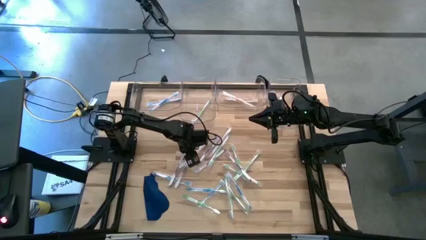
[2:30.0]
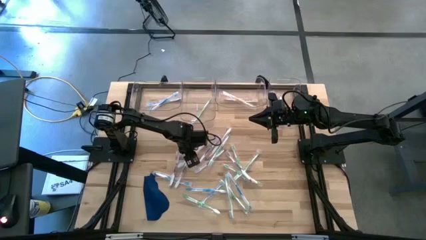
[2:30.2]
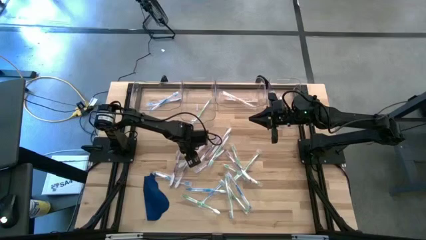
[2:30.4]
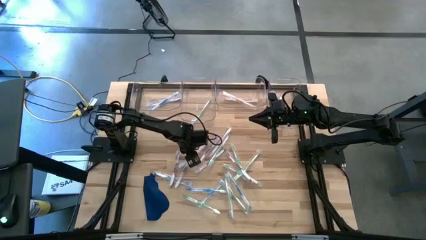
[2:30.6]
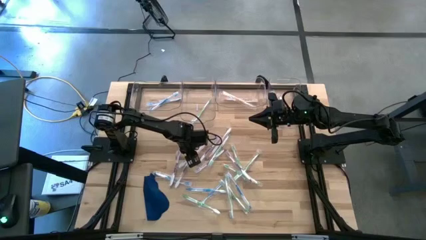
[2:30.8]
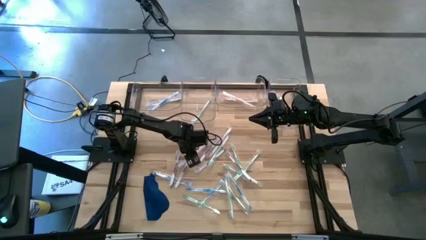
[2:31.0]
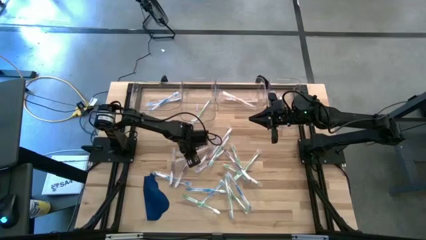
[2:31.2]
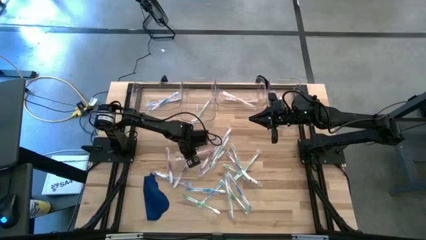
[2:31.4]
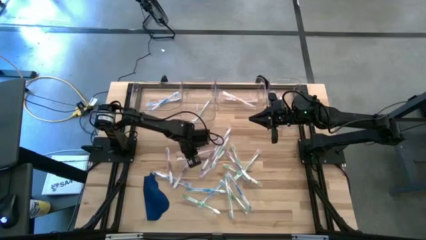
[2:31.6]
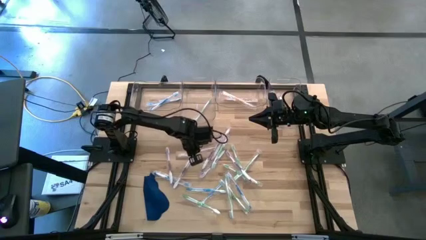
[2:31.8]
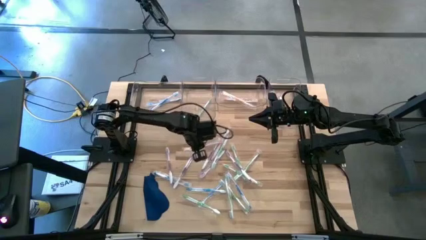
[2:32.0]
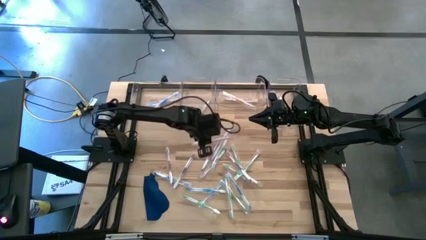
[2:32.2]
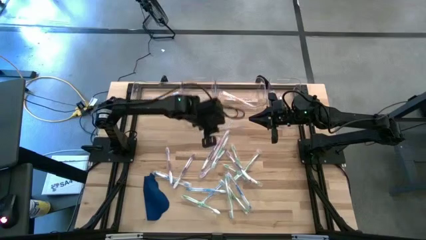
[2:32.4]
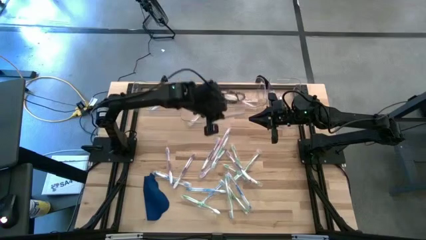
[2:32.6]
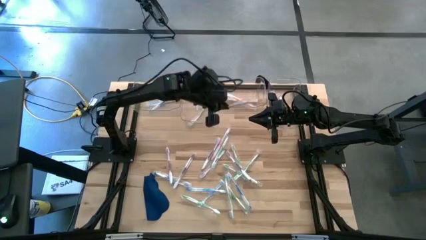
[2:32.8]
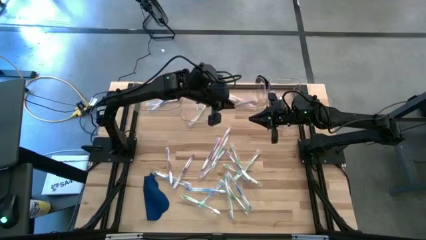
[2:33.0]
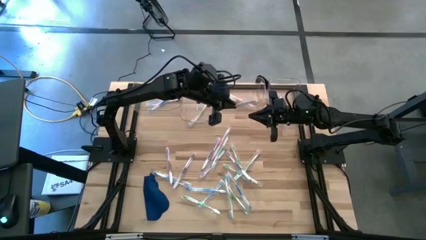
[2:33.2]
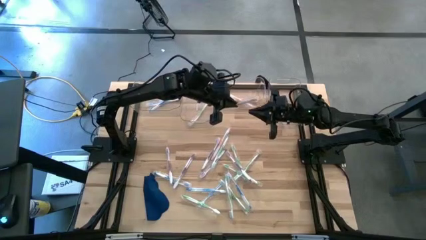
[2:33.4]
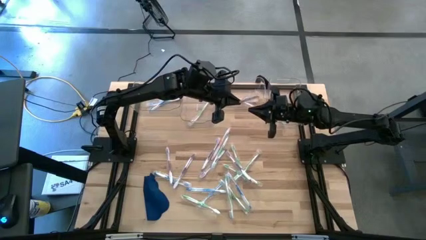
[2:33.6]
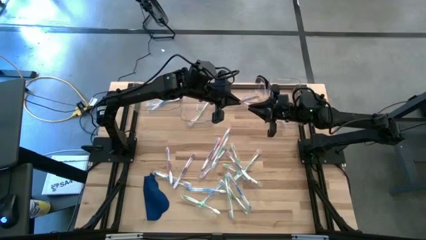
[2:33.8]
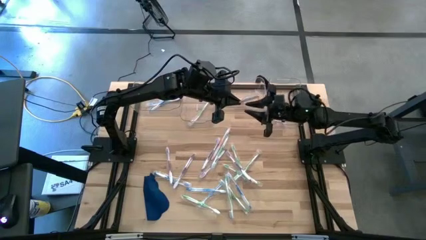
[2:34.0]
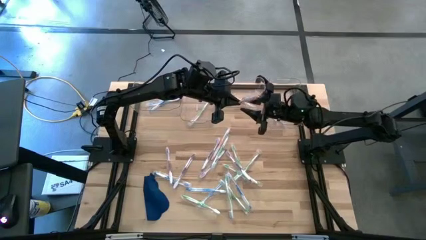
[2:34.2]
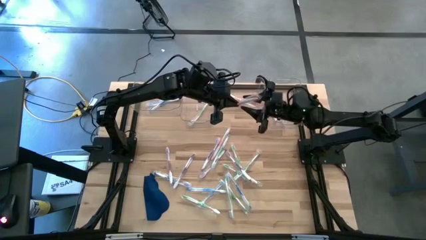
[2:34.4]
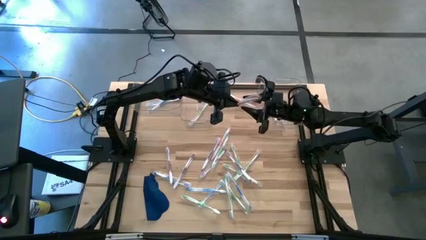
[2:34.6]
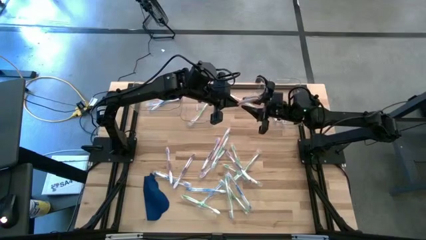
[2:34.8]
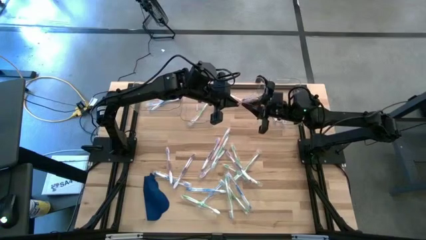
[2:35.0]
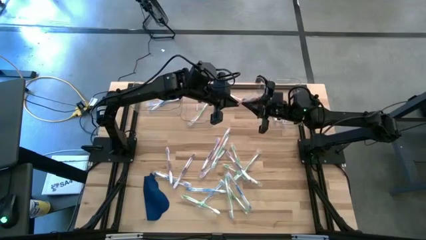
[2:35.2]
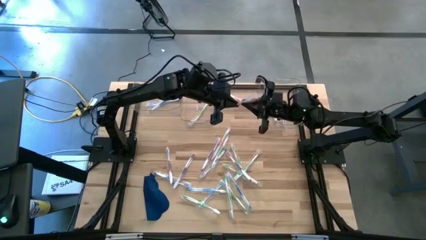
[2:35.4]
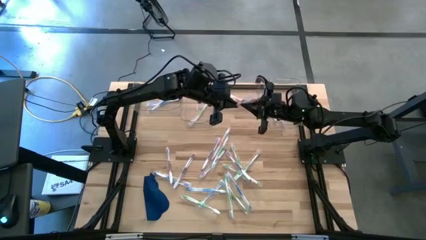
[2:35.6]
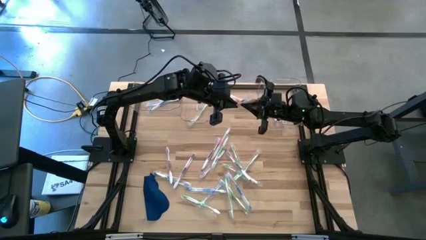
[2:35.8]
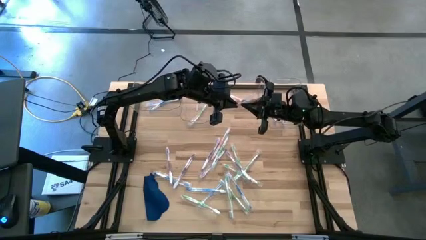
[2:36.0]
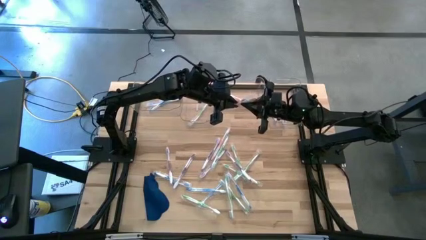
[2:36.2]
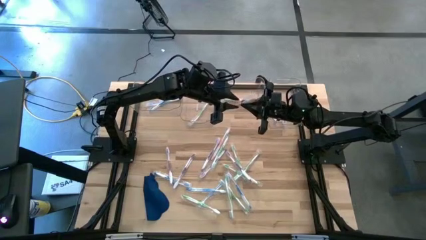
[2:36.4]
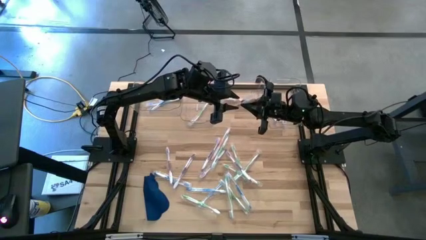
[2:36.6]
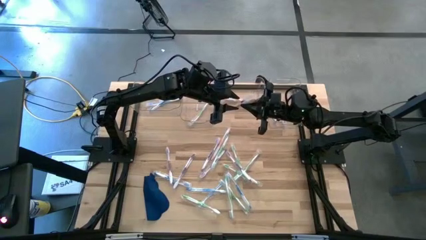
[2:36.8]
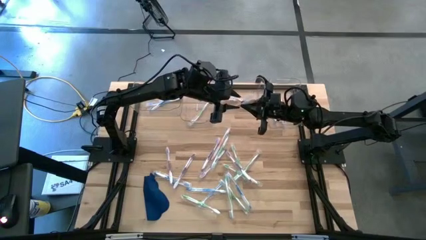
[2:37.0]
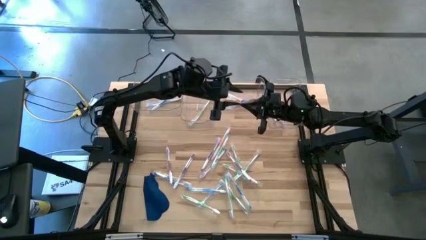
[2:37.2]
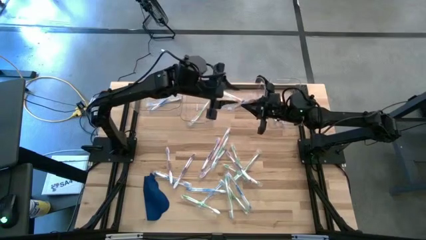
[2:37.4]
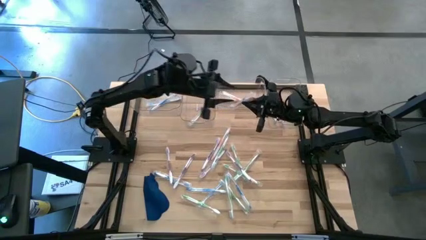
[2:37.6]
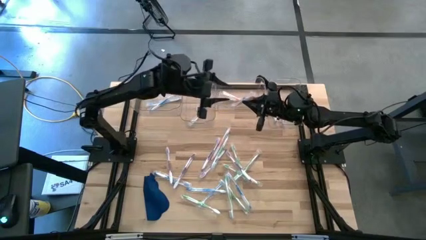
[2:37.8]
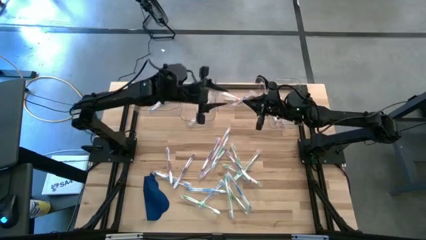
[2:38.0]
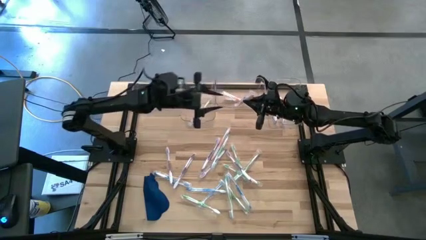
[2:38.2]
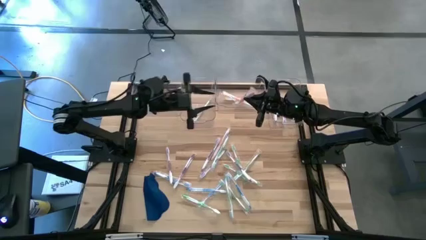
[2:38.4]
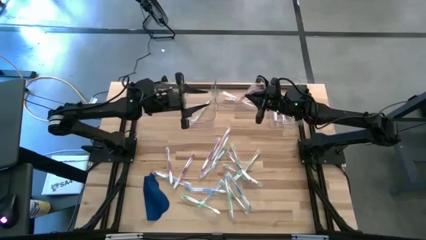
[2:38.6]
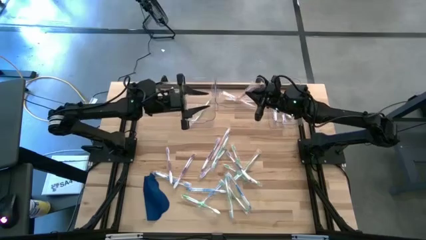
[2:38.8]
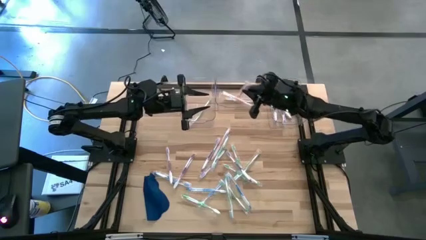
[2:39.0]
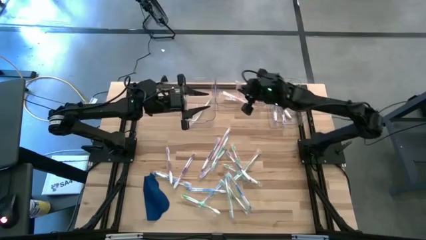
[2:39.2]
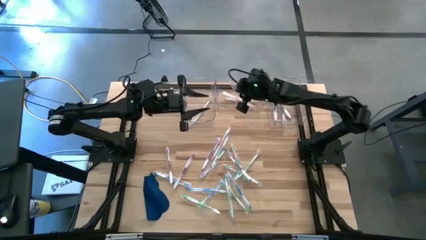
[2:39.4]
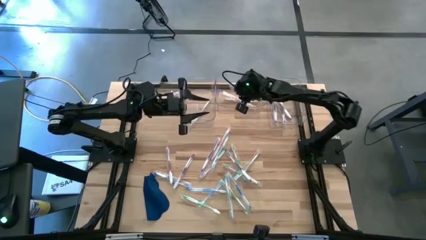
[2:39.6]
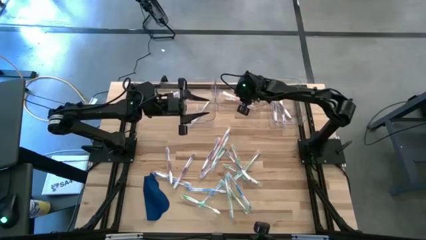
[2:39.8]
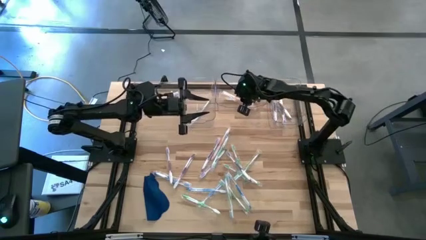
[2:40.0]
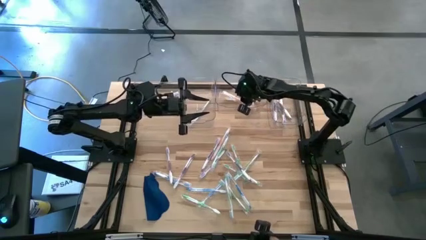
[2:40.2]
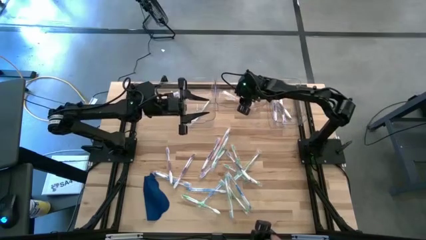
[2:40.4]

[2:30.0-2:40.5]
Task: Pick & Place Toothbrushes
Put the orange toothbrush into the middle right transparent bin

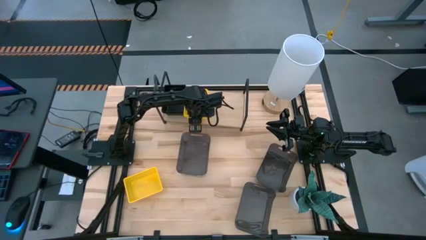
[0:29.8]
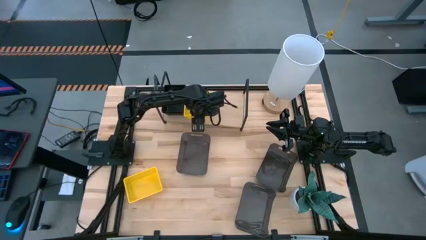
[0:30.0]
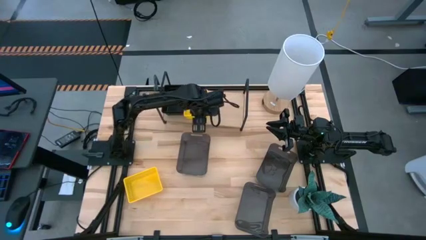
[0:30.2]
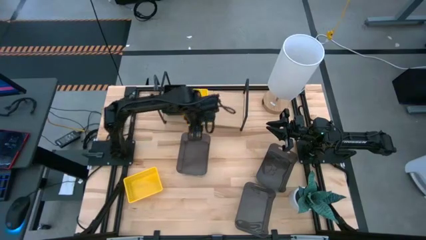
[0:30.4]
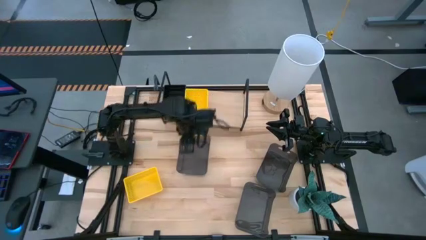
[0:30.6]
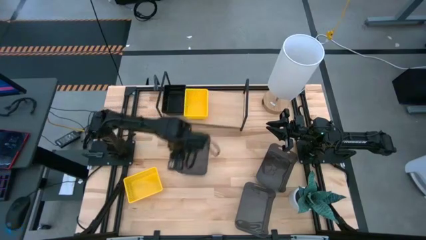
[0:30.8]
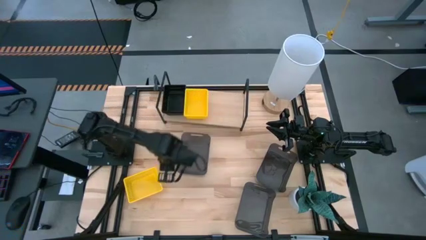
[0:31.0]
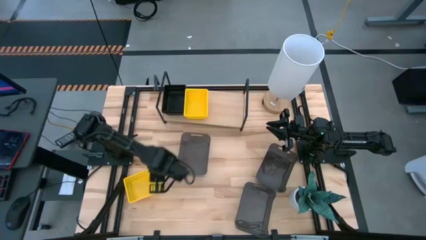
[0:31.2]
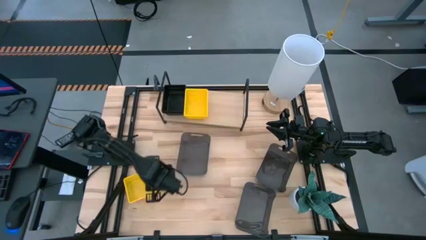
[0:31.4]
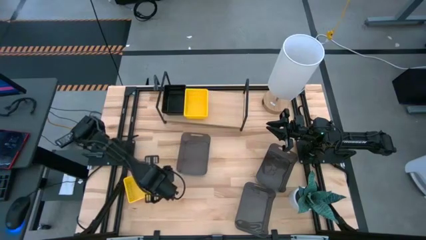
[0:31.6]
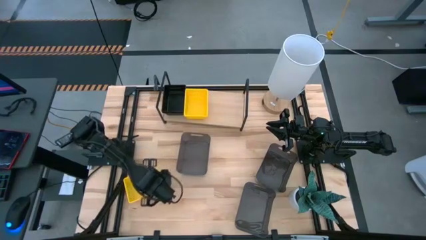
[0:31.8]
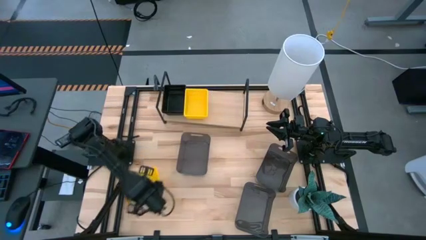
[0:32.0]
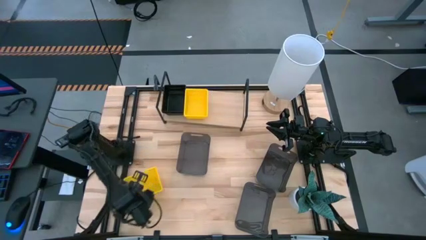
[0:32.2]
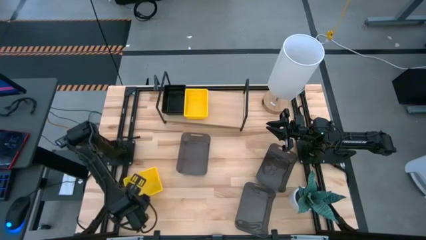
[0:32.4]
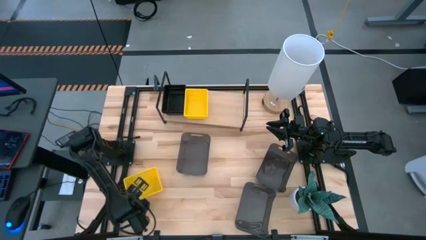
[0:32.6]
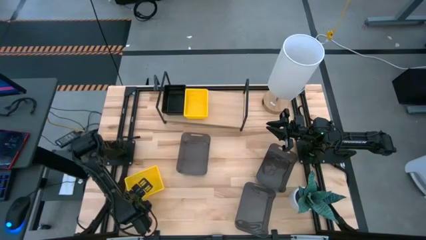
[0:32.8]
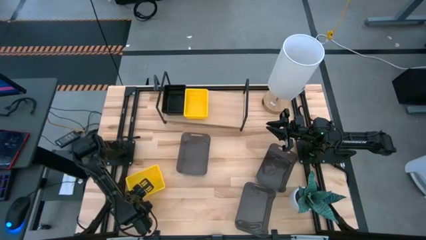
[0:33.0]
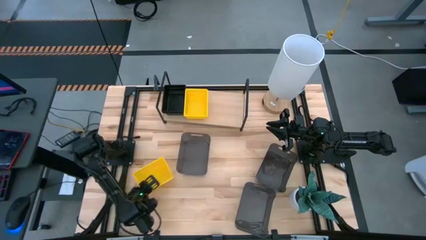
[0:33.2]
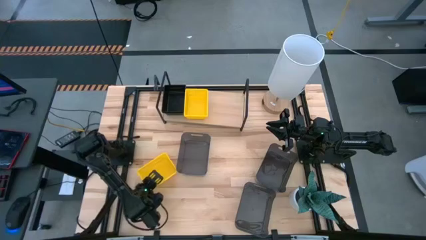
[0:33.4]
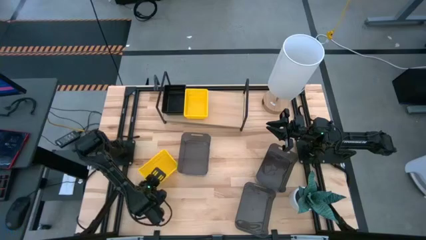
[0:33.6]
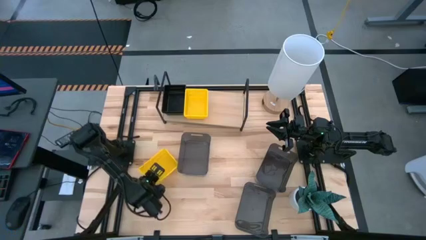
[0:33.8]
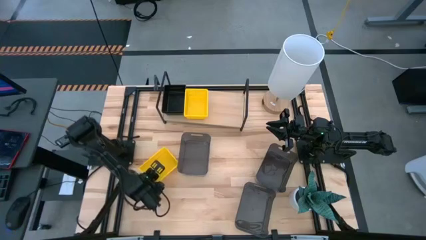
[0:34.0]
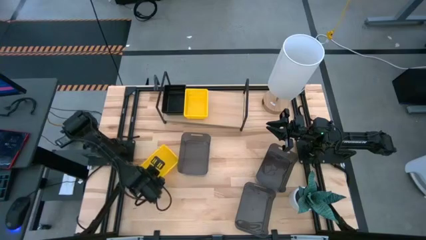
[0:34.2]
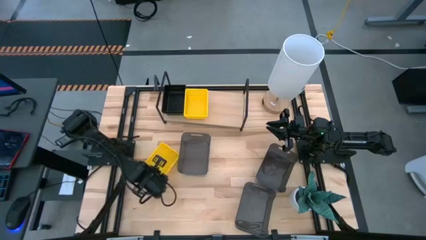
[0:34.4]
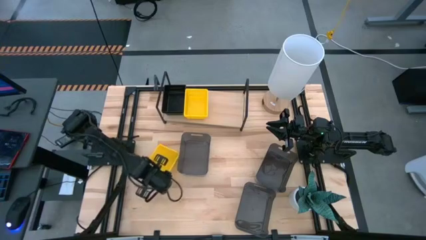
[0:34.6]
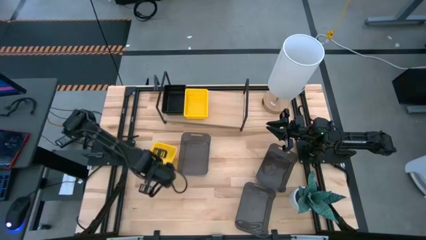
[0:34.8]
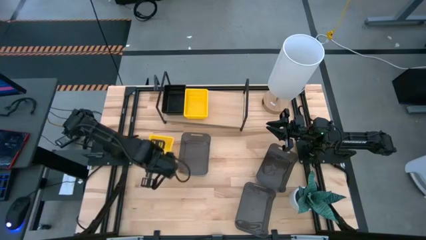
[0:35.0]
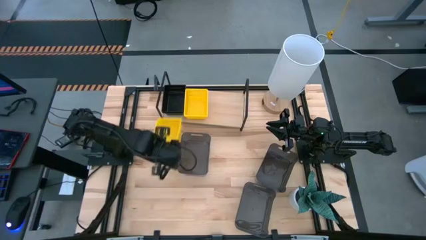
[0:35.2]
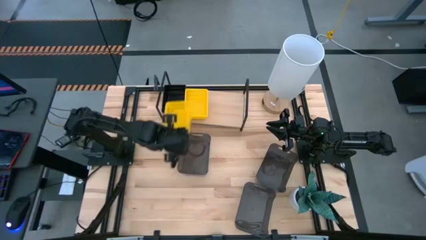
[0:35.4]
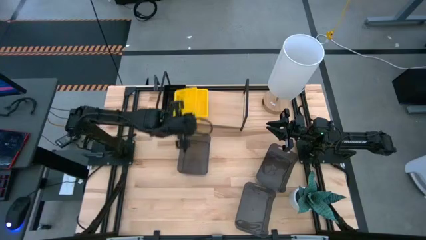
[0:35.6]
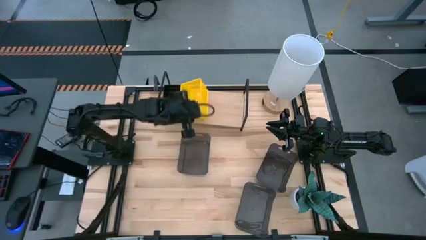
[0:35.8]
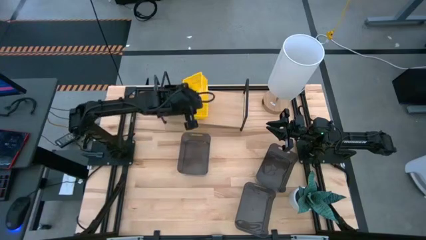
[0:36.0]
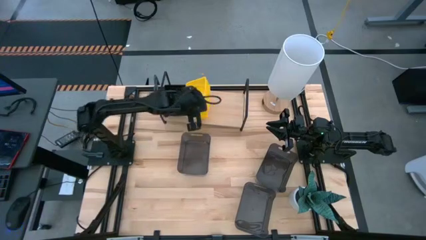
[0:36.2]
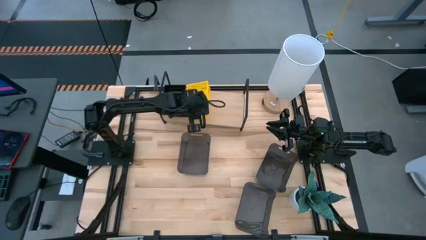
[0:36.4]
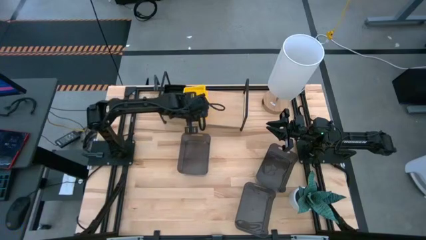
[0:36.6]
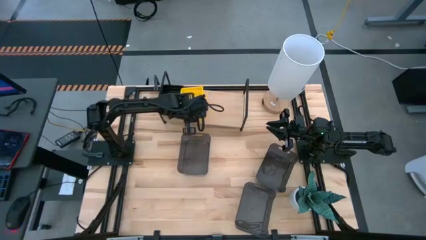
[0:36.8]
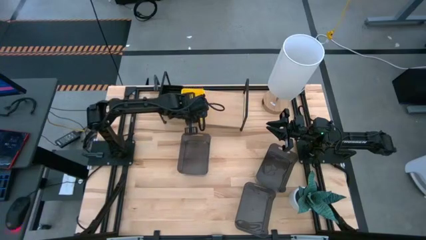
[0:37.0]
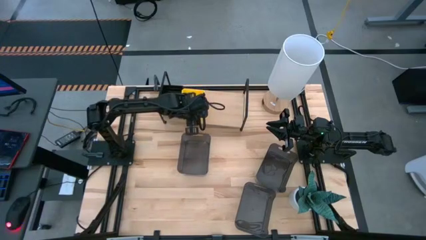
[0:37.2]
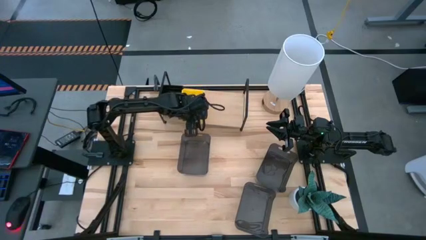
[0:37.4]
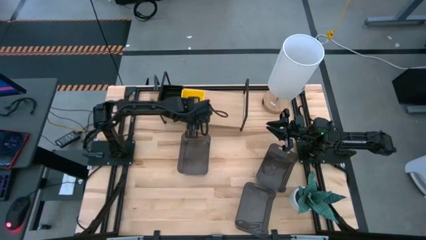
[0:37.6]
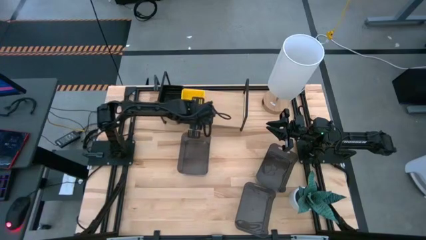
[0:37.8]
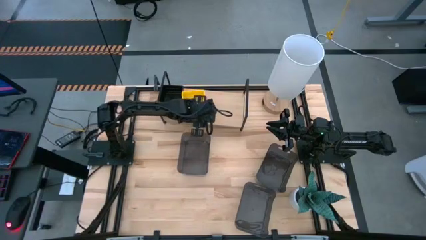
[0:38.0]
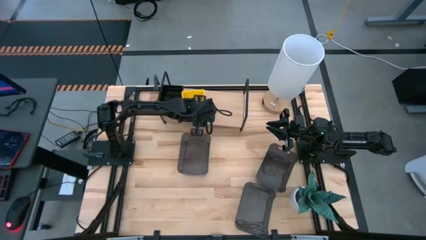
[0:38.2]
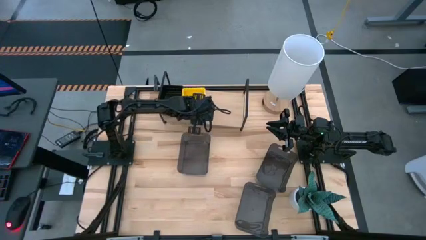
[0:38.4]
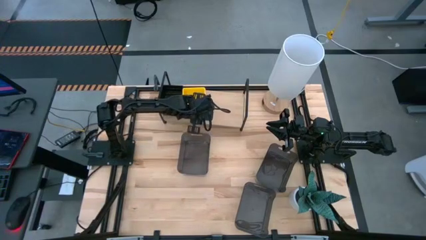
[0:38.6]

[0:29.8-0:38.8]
Task: Stack baskets on shelf by color
Stack the yellow basket on top of the yellow basket on the shelf
